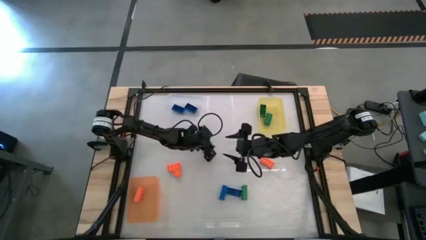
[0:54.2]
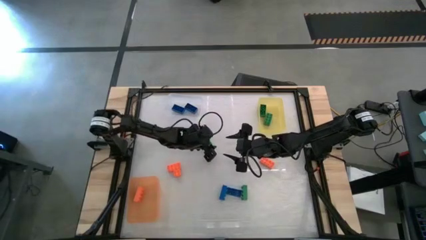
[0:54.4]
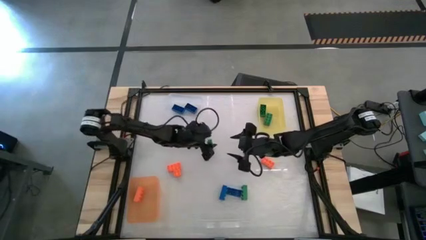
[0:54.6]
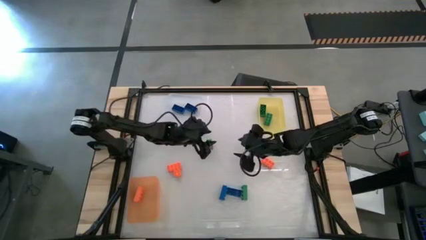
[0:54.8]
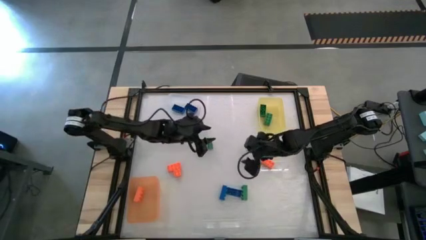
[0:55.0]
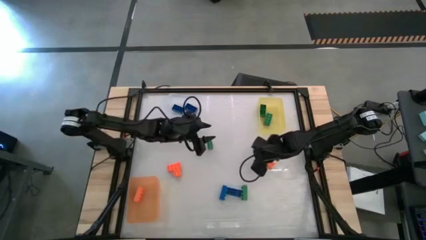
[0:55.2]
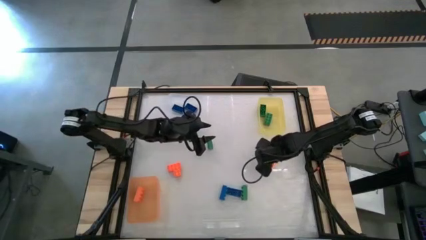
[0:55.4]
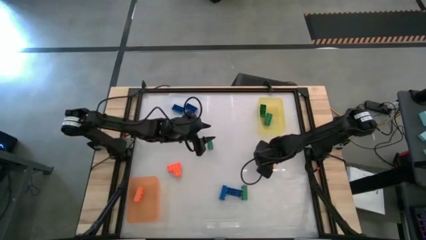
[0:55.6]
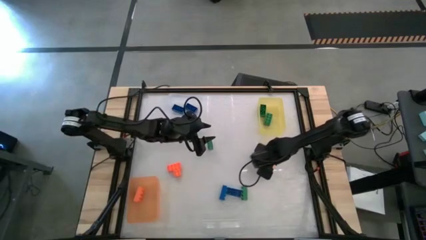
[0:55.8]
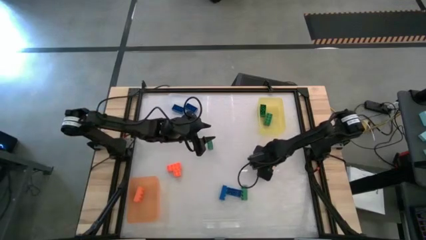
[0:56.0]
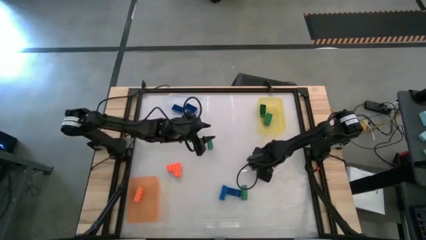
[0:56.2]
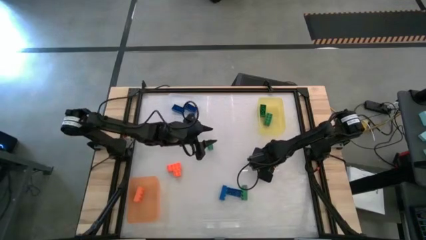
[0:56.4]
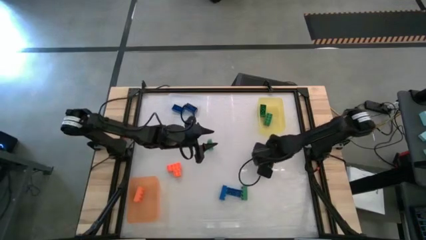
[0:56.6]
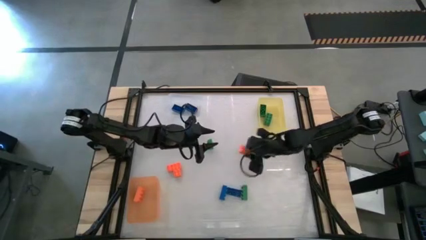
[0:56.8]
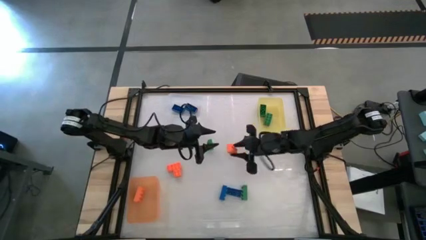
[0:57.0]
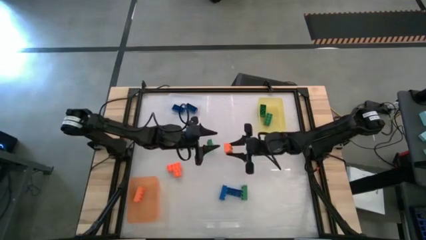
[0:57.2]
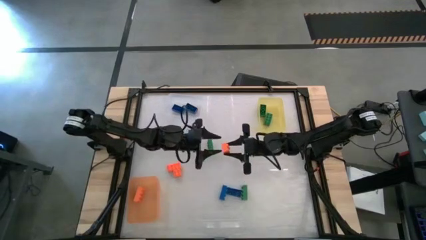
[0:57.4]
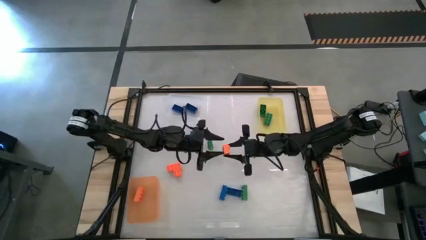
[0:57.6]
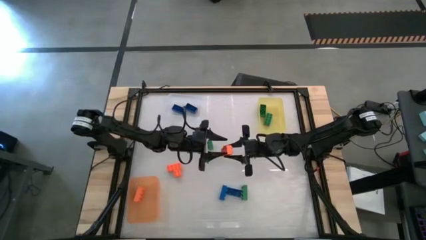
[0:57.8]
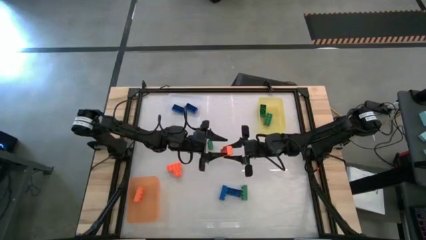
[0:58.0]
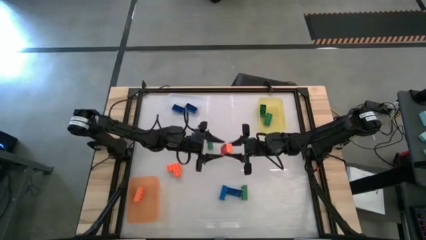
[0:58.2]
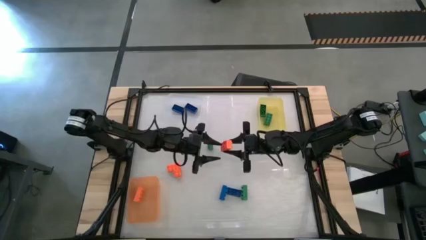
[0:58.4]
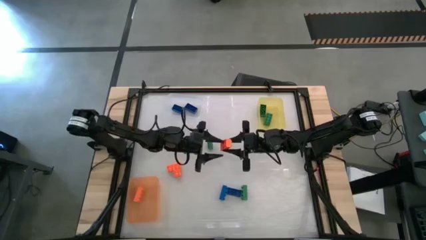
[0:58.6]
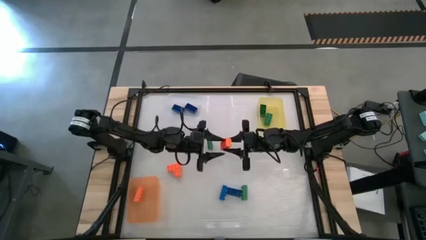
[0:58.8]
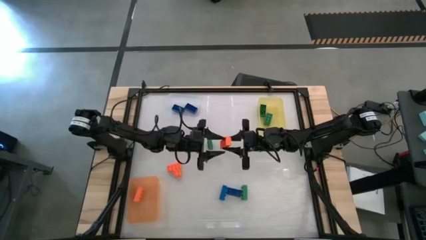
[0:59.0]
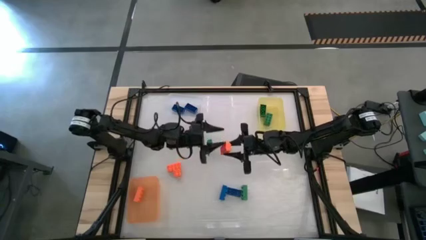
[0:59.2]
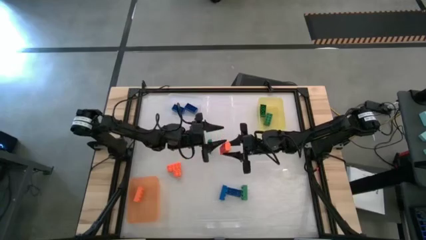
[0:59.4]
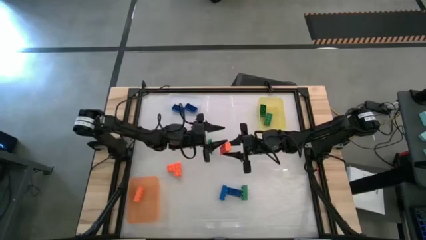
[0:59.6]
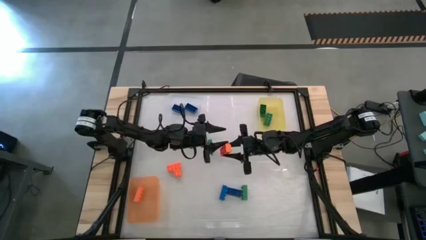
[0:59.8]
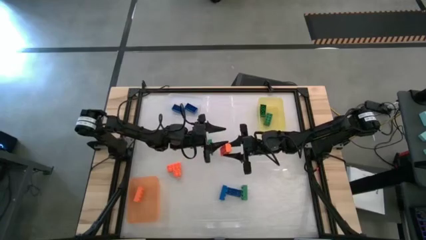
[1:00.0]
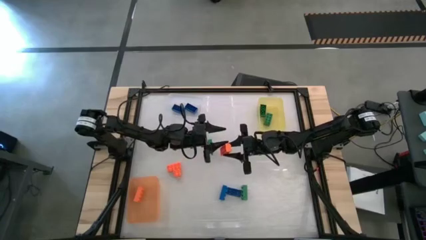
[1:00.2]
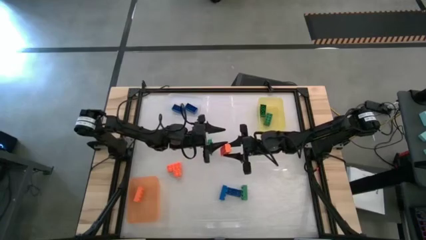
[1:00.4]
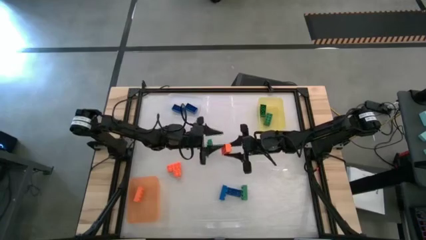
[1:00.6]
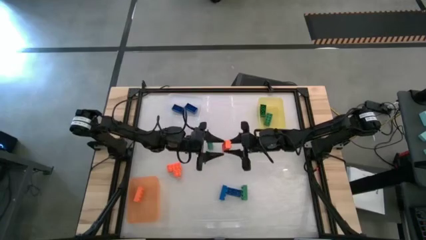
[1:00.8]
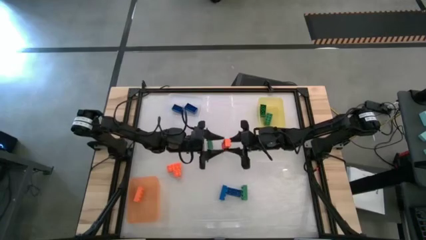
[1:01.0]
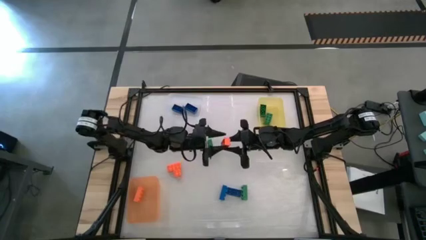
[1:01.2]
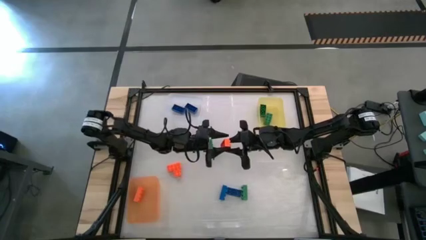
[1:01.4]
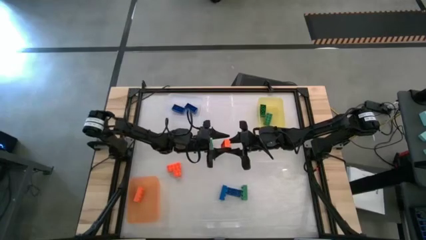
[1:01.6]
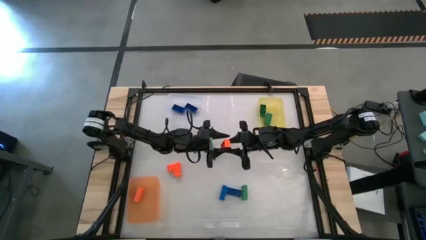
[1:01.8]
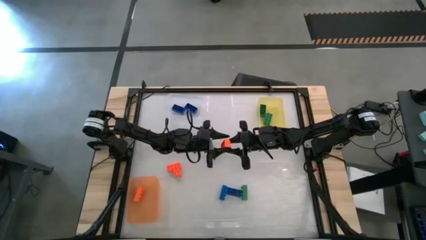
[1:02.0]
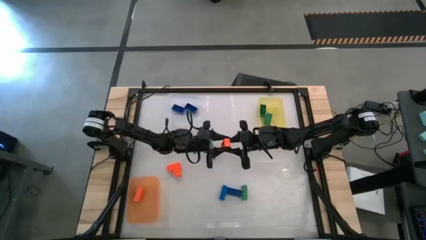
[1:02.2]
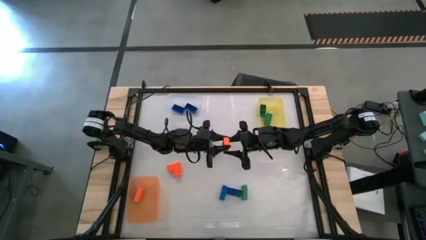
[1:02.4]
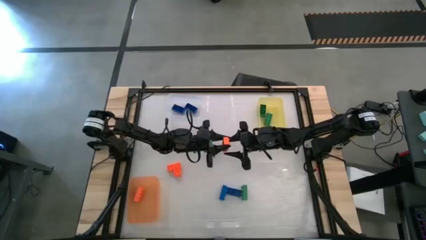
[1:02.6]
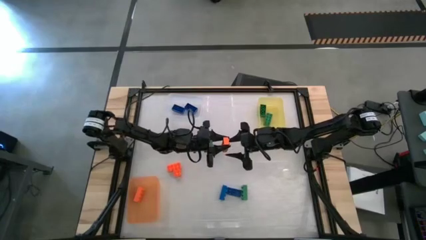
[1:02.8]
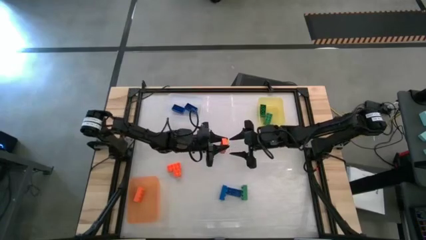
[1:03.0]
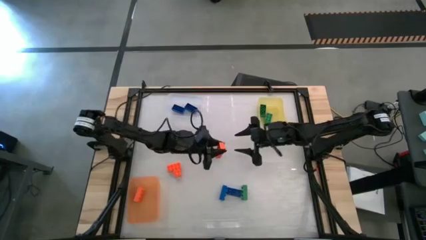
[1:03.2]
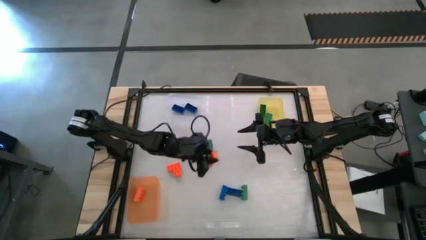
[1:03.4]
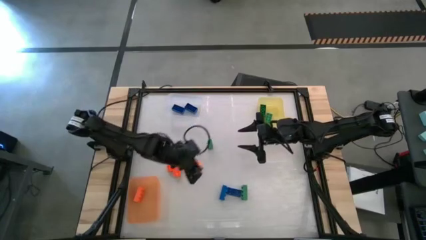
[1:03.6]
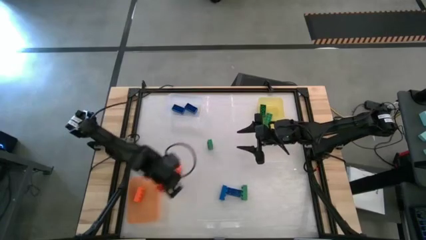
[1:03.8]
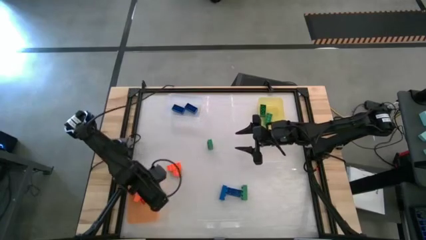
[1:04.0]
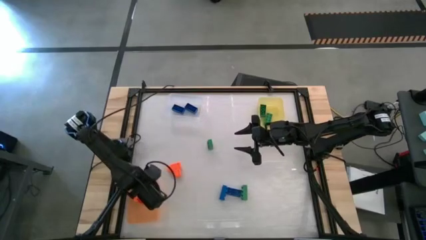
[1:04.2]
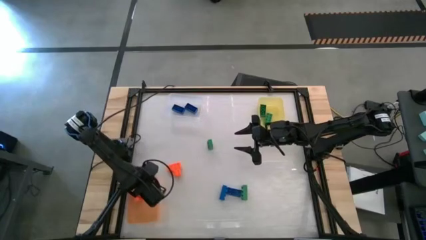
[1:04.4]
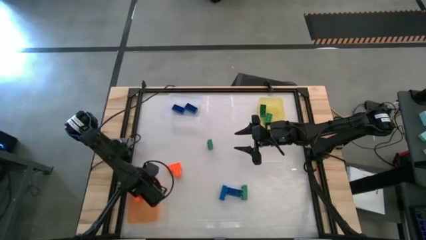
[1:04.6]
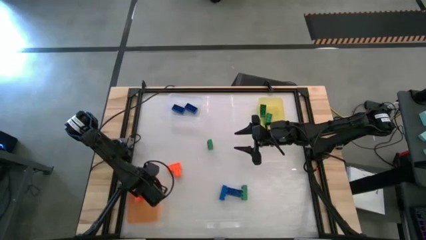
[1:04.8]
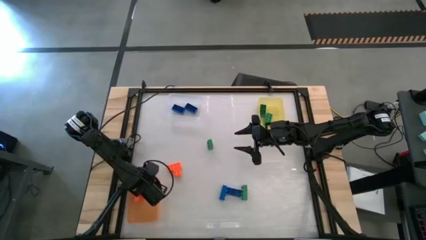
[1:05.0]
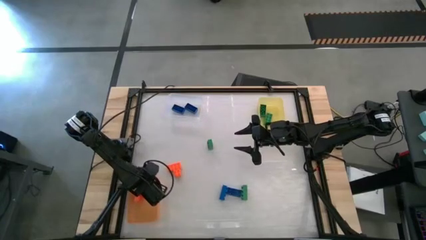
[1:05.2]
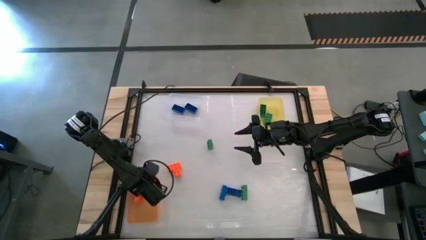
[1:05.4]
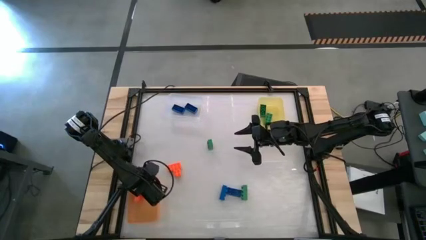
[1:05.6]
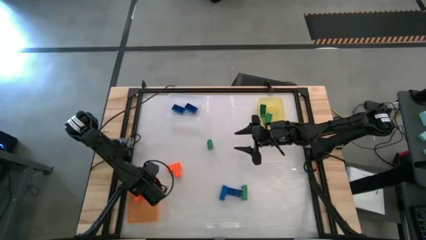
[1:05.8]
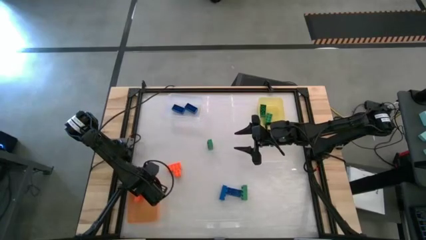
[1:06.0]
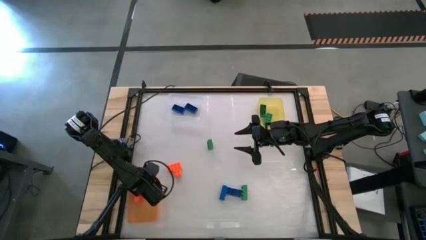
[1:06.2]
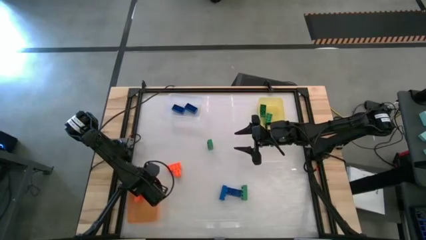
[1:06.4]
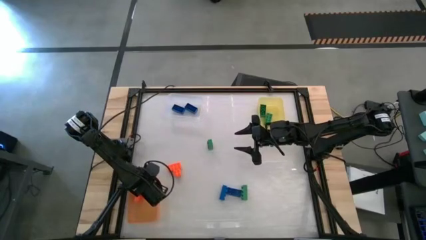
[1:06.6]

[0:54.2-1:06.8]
Task: Sort & place blocks by color
Put the orange game piece into the orange bin

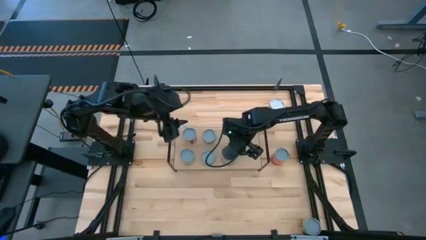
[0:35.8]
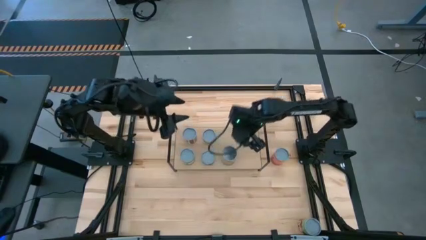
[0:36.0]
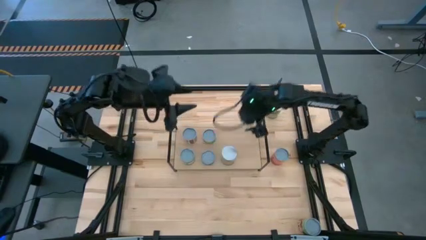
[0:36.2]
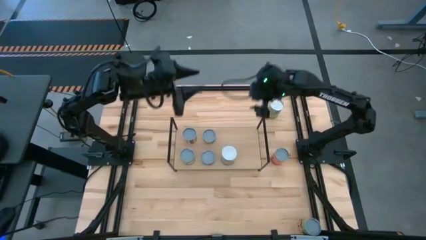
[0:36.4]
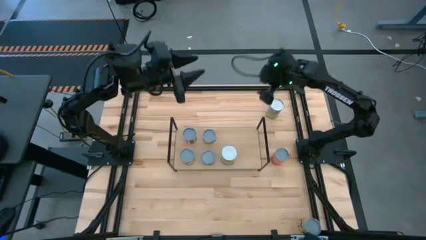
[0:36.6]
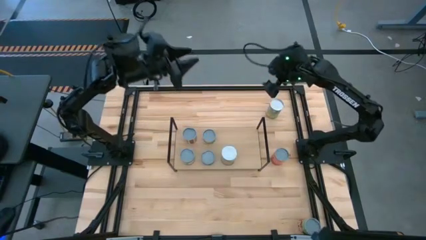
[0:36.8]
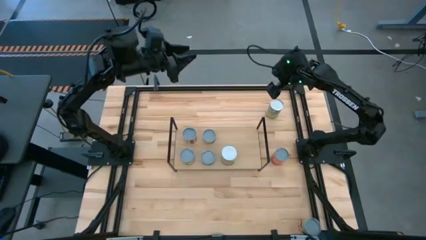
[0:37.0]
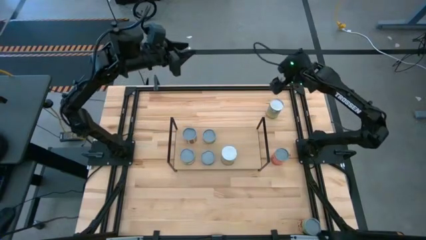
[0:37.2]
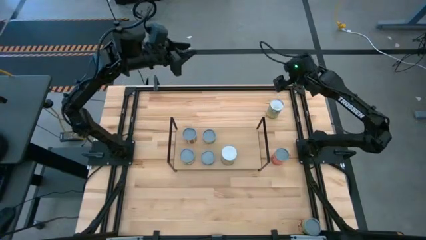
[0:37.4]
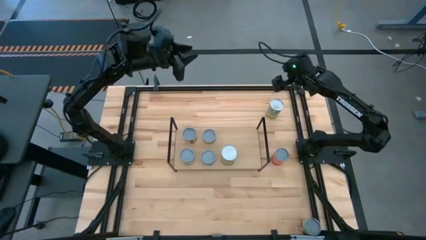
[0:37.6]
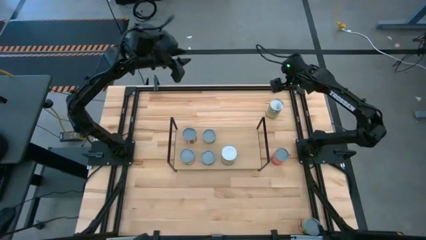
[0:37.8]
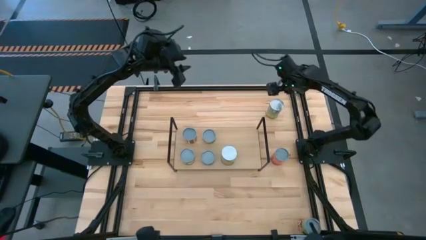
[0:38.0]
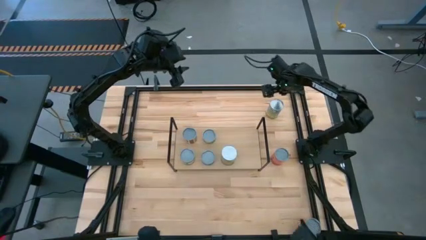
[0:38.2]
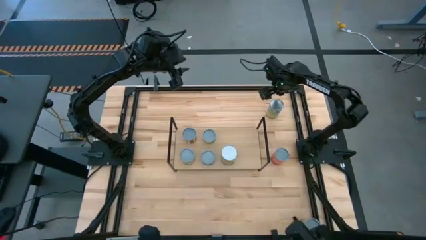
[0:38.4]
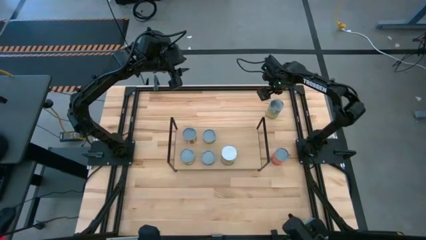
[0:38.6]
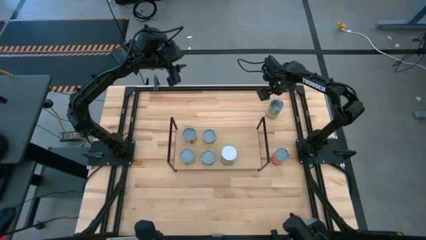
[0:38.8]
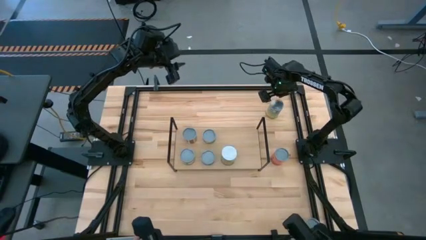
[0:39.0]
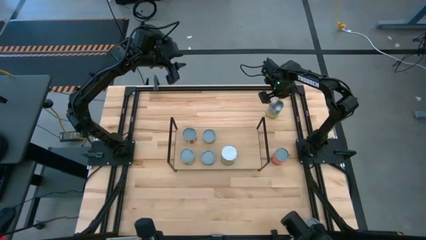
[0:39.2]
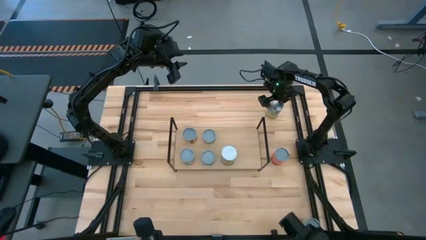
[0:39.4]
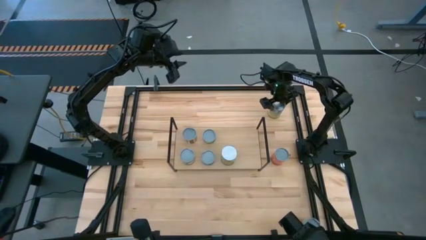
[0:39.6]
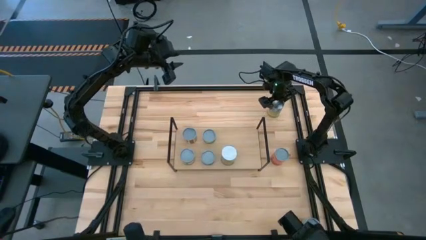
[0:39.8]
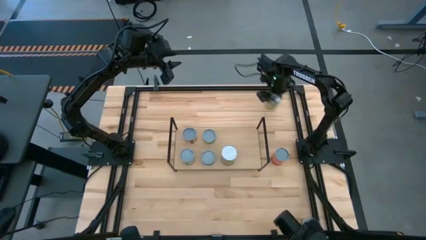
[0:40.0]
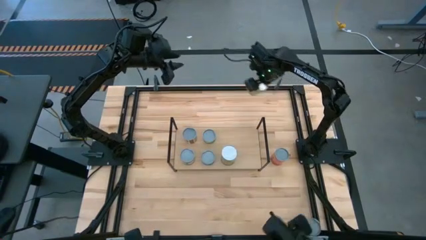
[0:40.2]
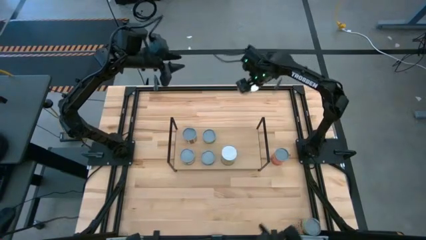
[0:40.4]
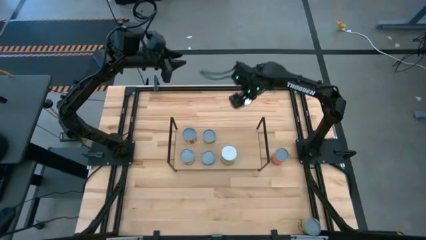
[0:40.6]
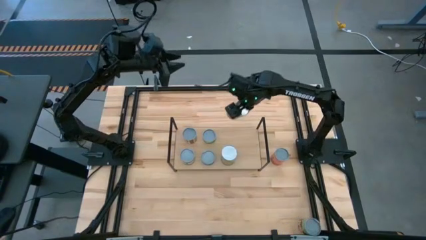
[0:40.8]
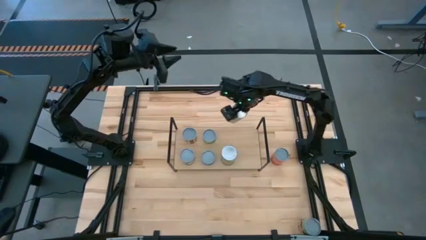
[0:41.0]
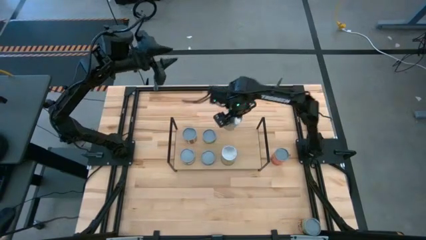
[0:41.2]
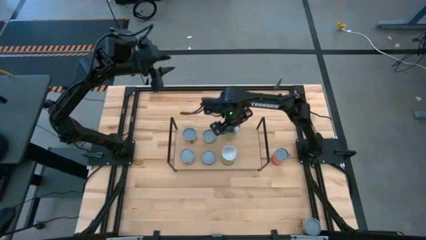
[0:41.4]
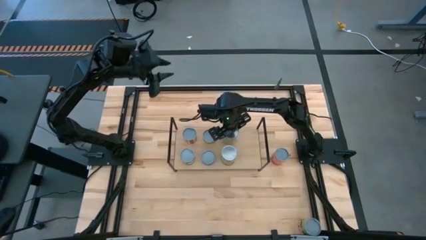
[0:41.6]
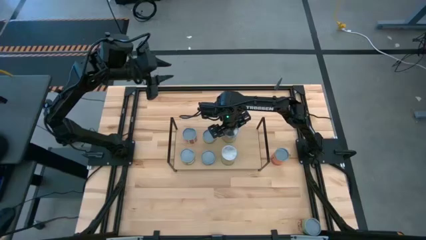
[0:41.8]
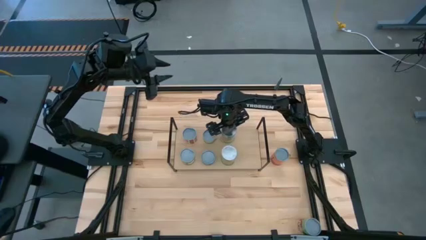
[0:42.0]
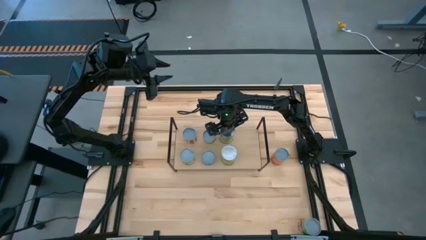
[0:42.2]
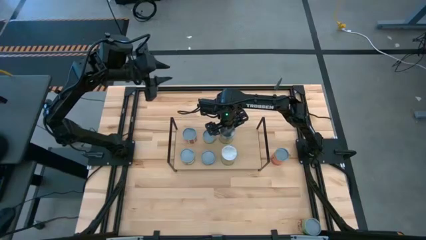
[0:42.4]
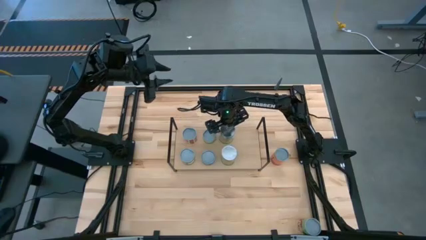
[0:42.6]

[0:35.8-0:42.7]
Task: Pick and place cans onto a shelf
Put the canned carrots on the shelf
